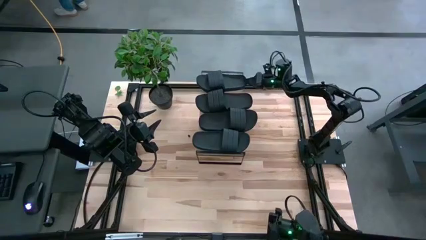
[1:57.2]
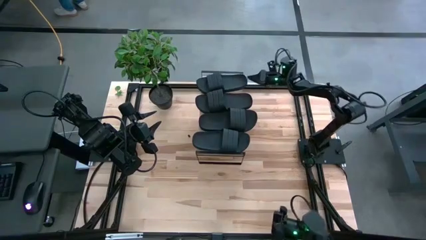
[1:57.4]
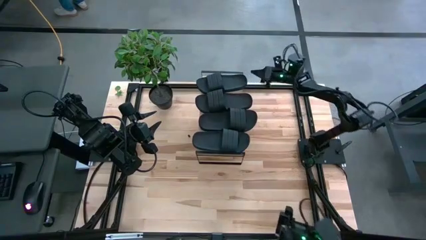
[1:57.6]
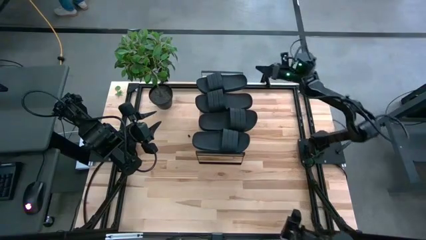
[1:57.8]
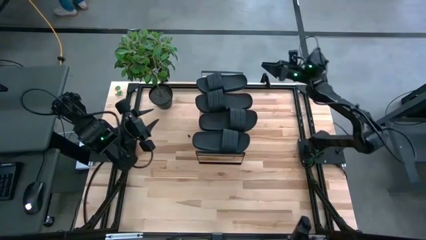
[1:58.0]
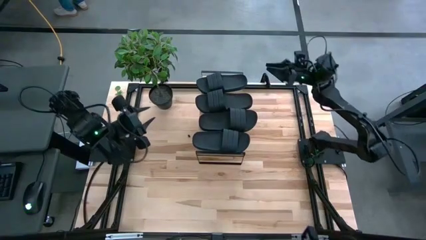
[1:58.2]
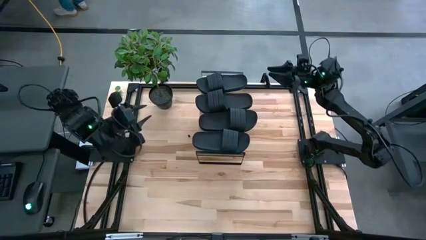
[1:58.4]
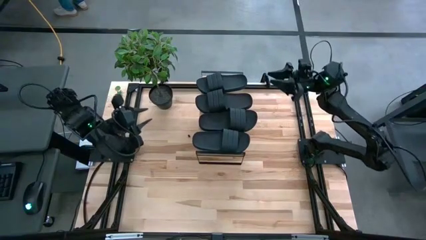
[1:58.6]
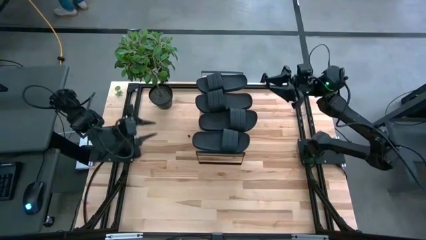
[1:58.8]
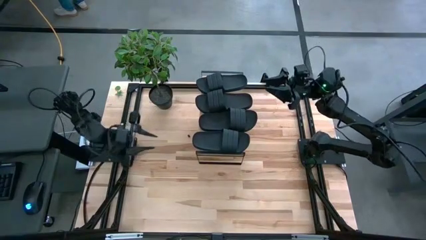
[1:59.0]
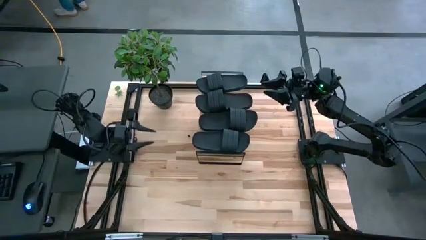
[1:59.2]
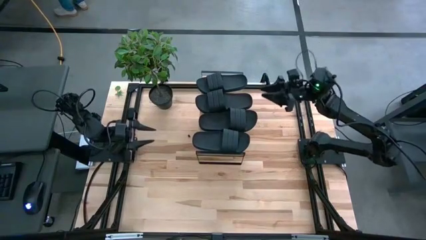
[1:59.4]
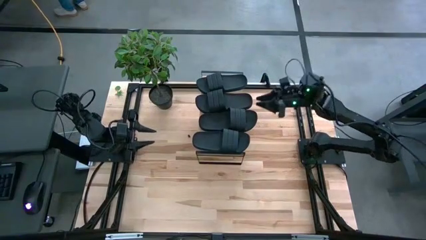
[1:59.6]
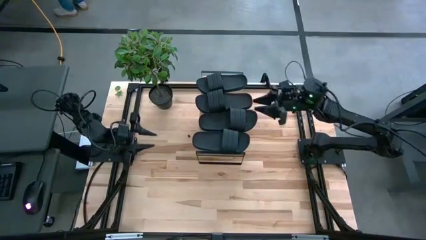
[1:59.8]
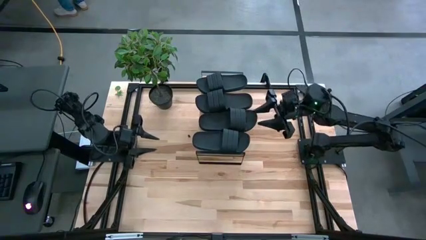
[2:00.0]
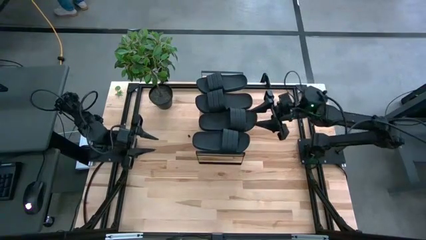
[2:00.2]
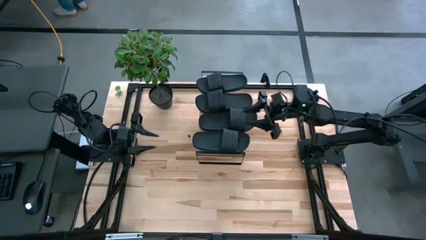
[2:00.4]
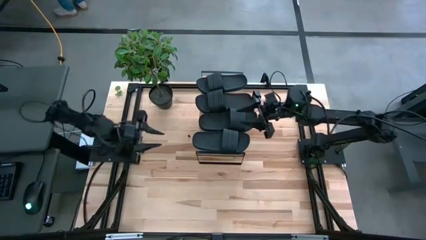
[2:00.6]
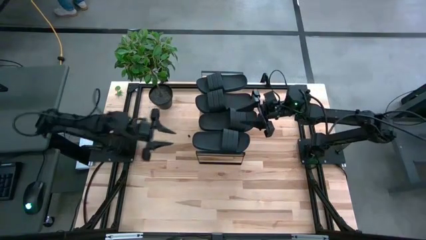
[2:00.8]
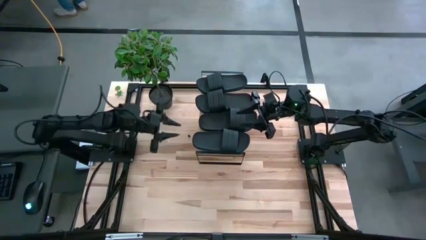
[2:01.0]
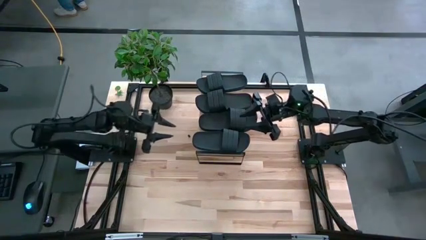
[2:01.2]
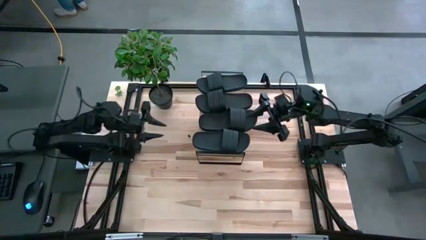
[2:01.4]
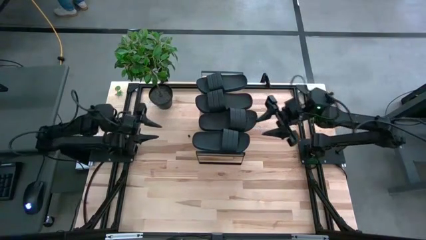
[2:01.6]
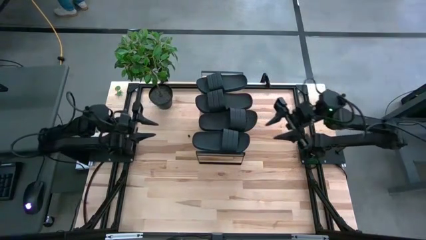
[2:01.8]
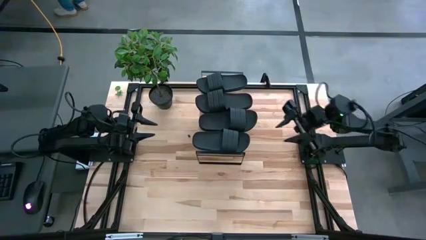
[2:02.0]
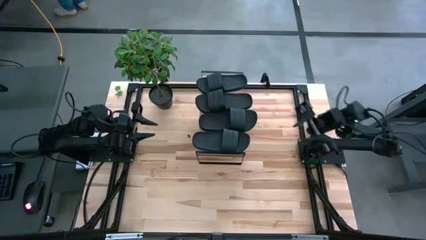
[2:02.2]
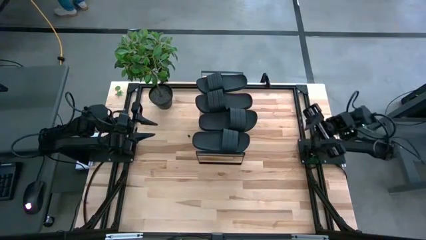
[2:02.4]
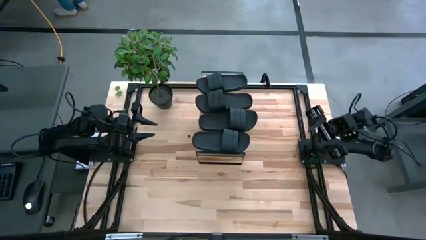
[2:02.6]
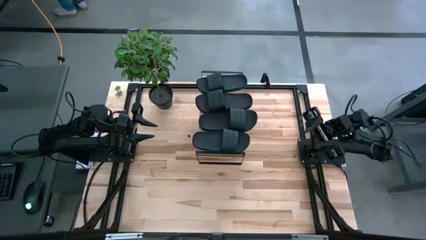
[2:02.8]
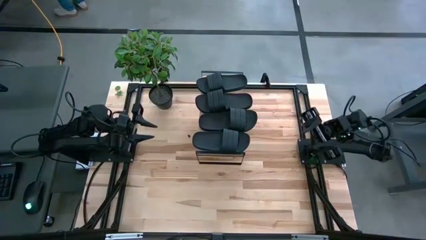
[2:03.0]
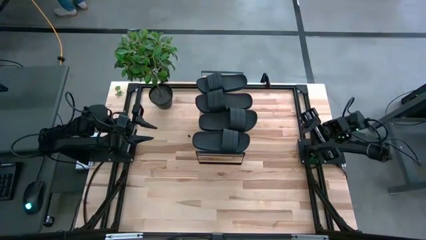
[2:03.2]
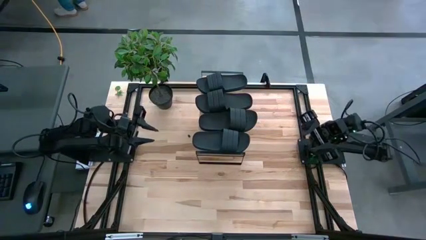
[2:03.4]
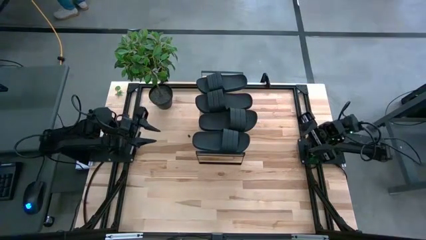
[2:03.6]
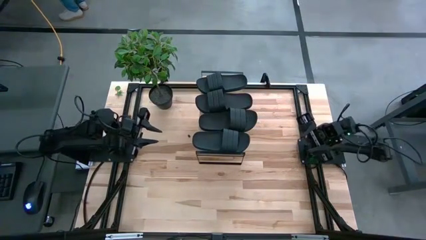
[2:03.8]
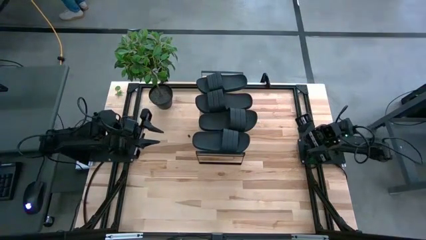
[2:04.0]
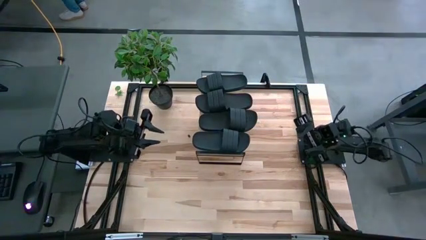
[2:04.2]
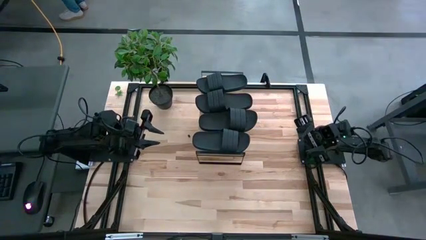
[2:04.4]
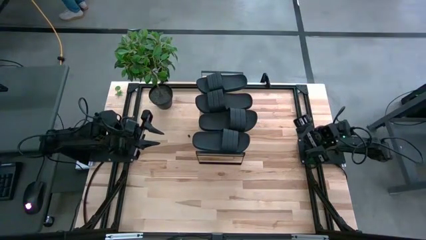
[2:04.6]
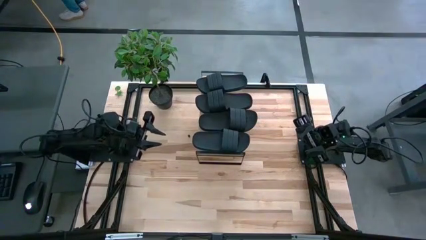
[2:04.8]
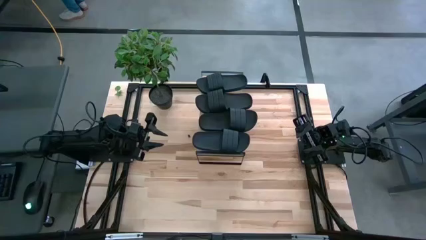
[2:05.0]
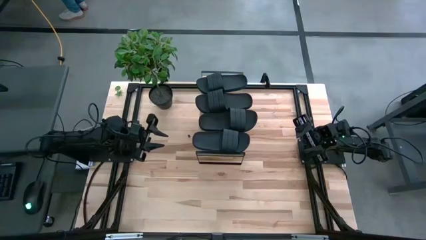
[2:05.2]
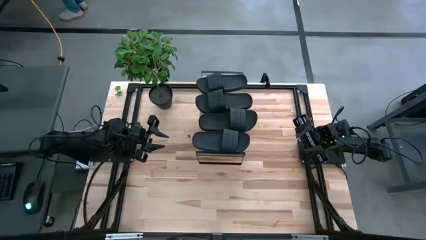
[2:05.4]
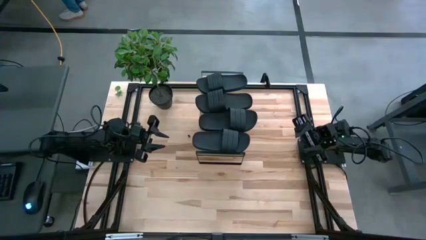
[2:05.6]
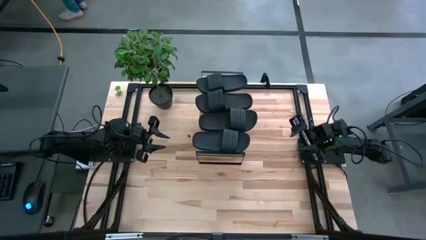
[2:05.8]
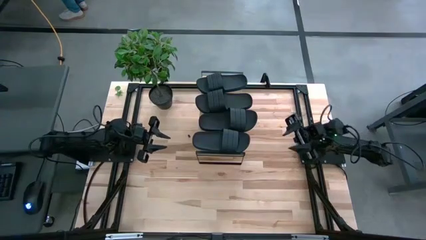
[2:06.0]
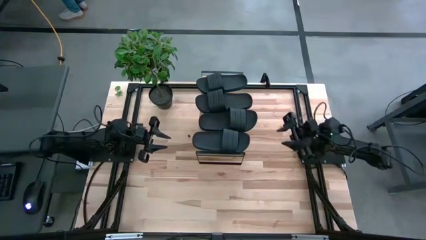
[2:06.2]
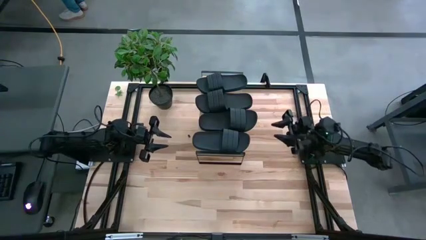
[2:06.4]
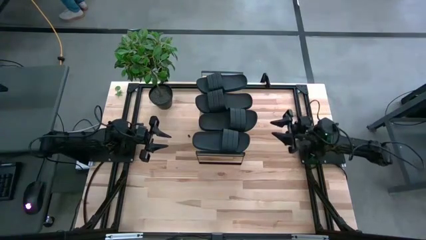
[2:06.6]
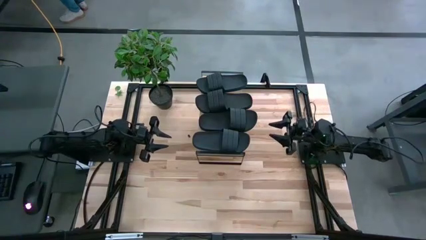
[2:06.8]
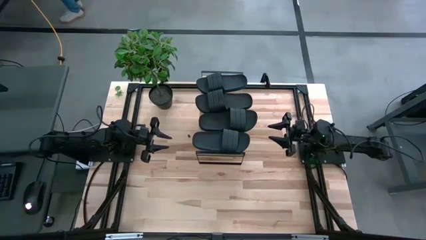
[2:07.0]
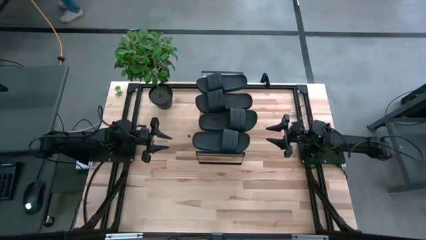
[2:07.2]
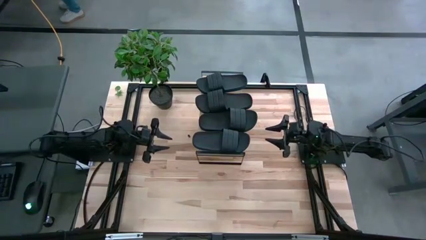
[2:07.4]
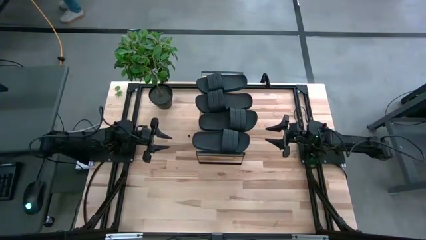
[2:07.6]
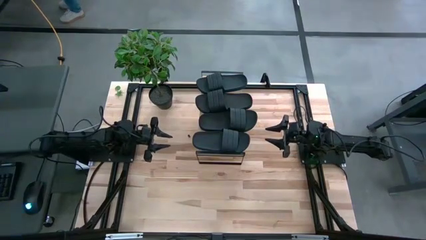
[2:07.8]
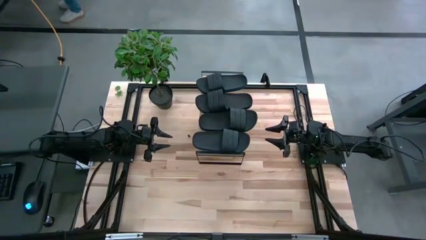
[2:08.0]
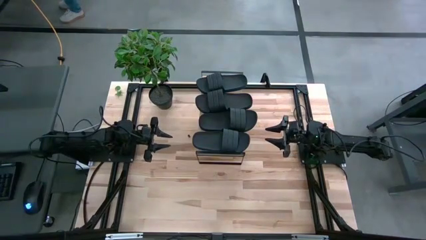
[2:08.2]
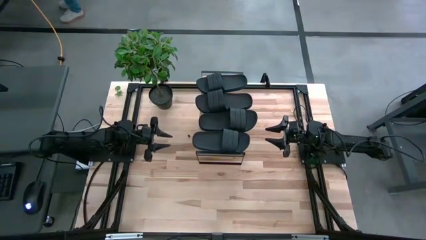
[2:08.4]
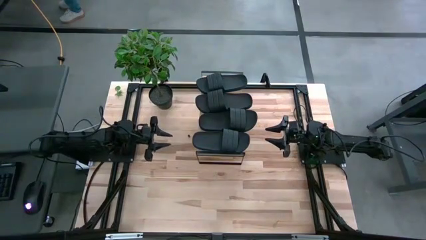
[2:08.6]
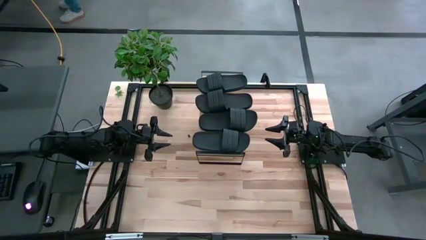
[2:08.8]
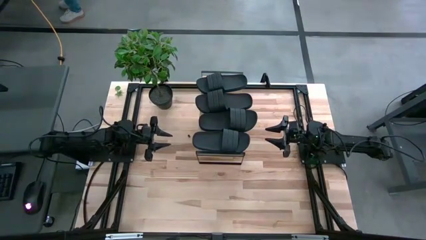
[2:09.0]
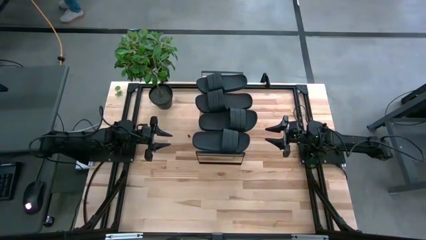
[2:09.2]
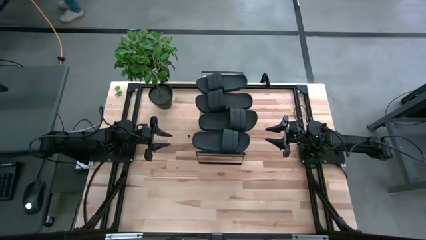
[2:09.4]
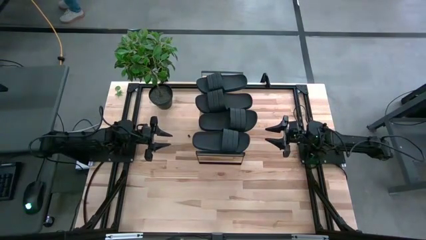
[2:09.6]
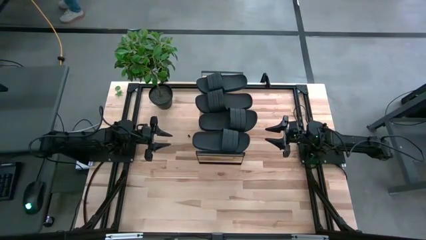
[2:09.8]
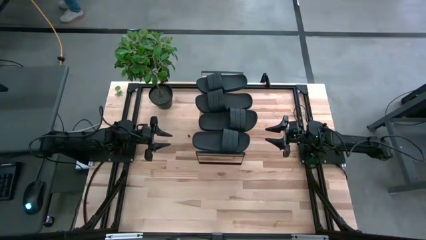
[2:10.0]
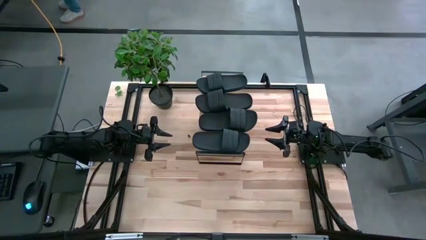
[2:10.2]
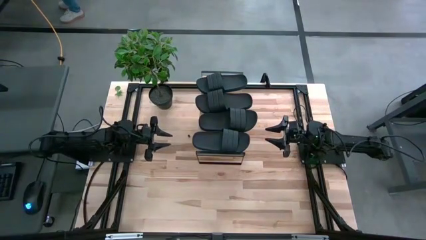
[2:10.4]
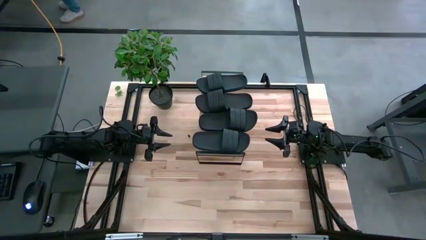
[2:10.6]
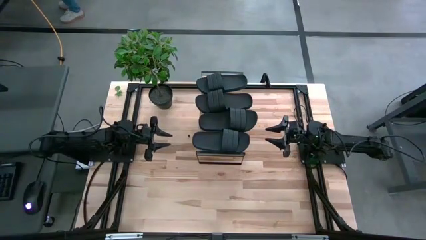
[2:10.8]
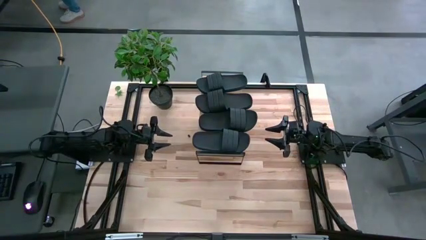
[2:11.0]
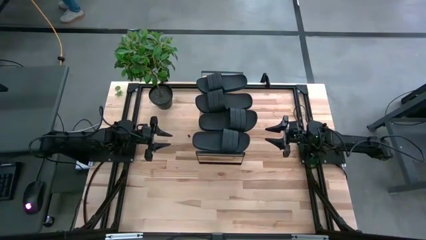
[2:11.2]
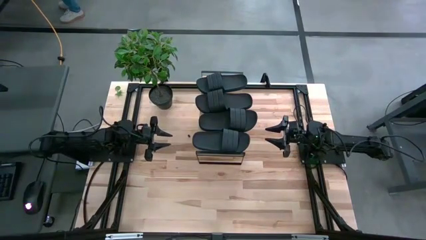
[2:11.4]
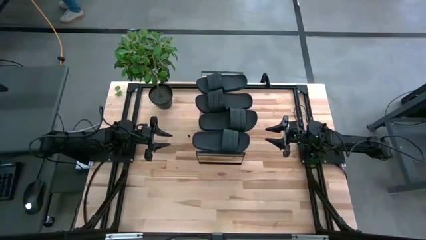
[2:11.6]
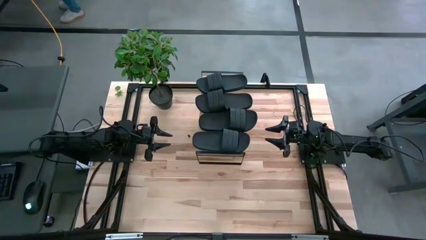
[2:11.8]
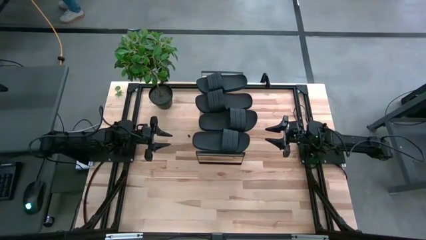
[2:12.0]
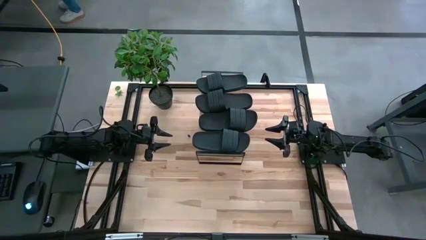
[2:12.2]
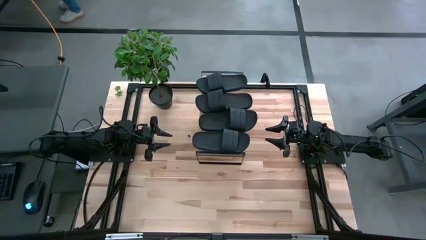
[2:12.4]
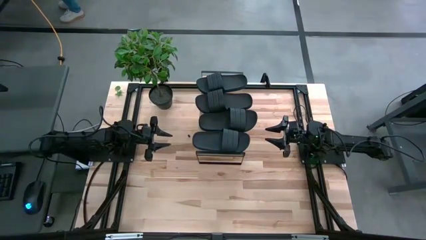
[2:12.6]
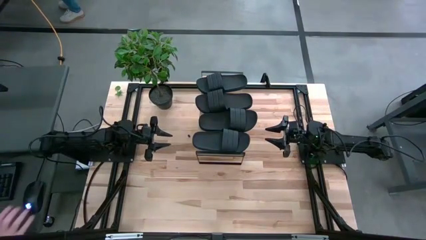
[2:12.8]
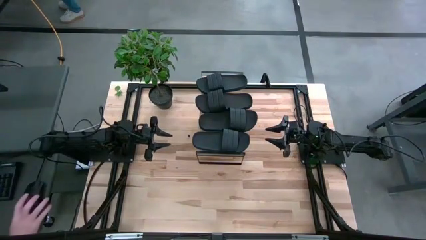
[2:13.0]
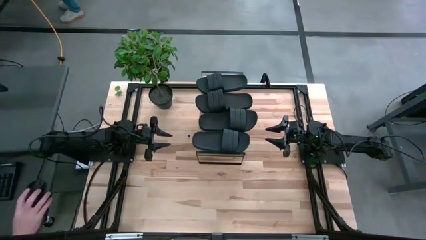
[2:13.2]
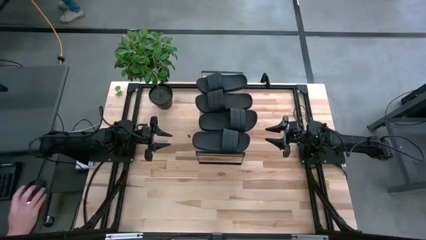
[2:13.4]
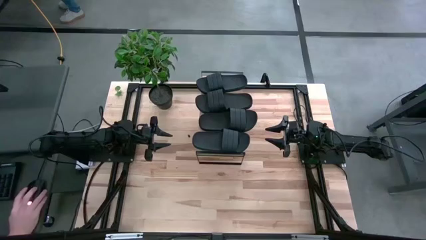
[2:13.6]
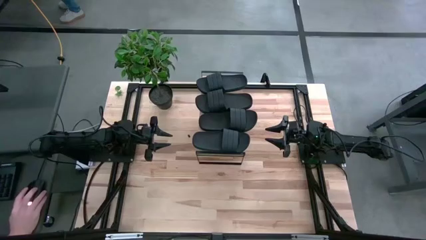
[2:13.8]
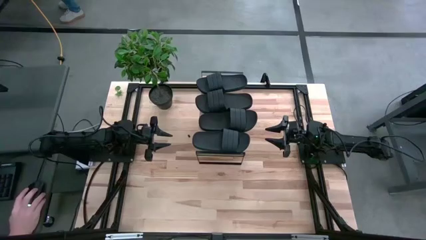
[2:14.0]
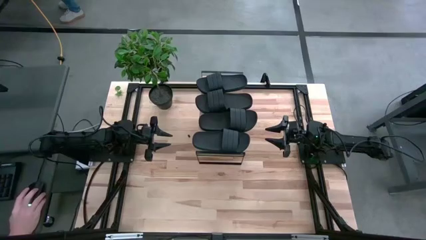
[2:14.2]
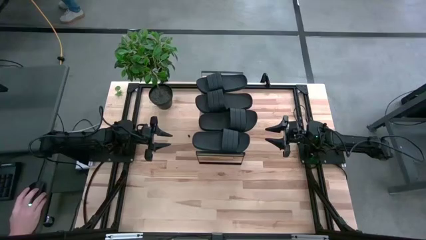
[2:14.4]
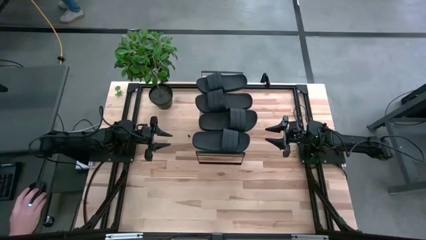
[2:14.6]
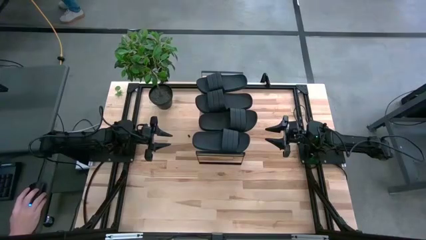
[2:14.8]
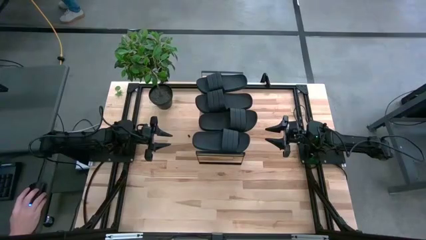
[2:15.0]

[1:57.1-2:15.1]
Task: Pick and place slides into the shelf
Return to Home Position
